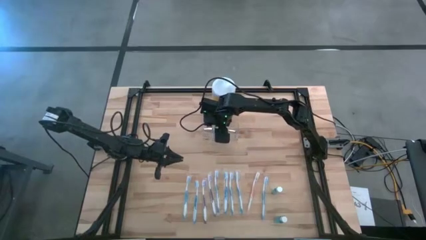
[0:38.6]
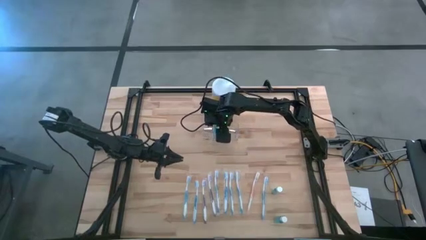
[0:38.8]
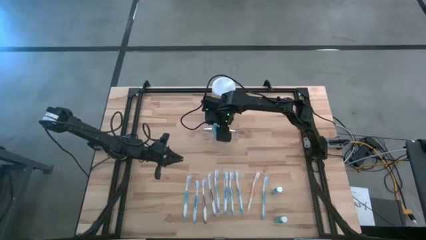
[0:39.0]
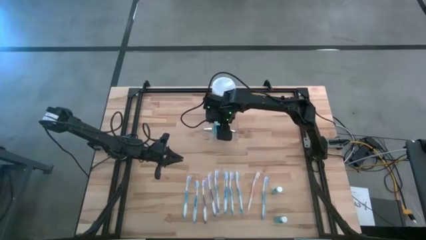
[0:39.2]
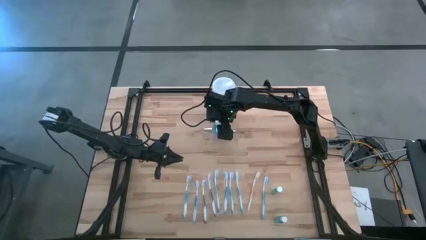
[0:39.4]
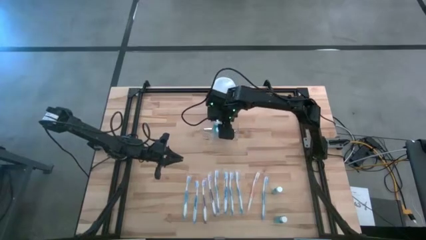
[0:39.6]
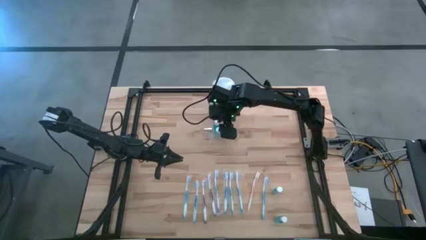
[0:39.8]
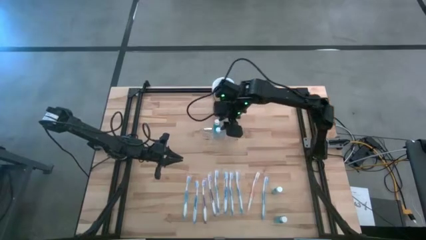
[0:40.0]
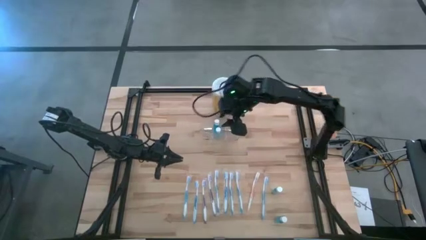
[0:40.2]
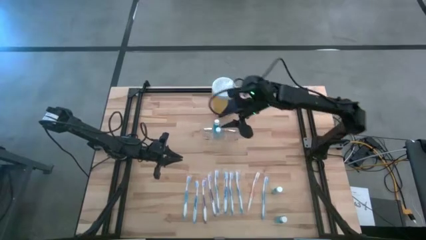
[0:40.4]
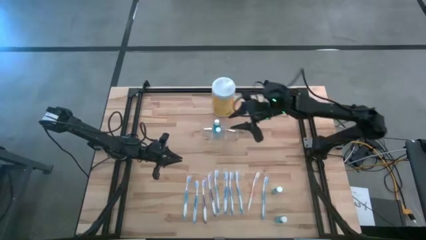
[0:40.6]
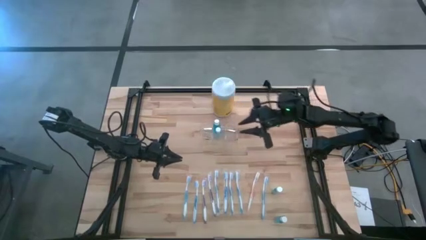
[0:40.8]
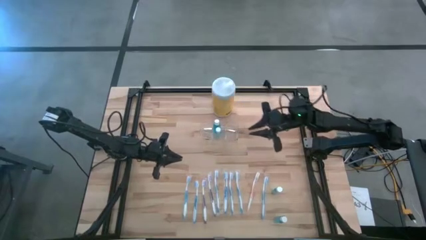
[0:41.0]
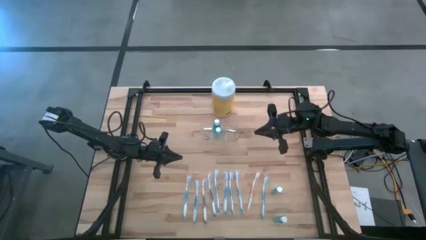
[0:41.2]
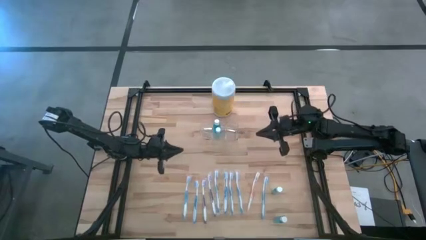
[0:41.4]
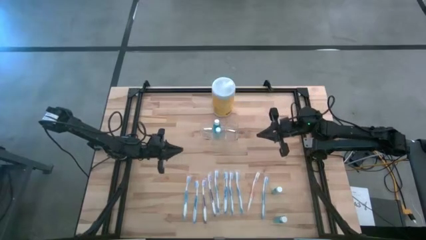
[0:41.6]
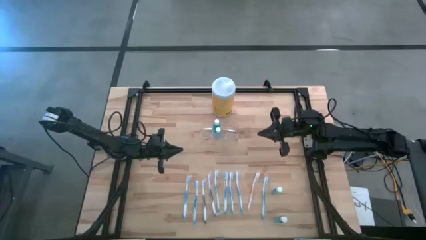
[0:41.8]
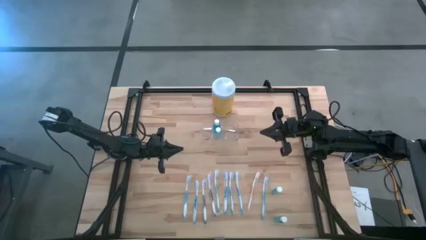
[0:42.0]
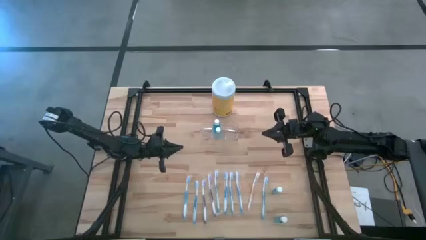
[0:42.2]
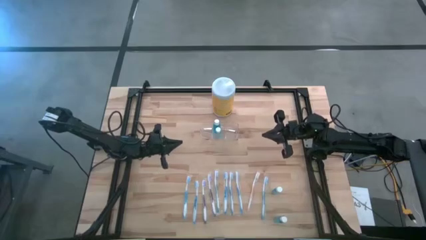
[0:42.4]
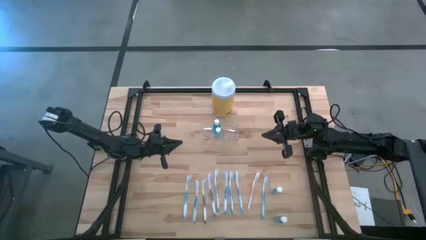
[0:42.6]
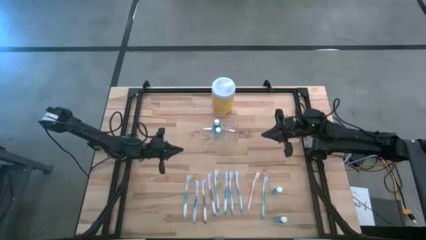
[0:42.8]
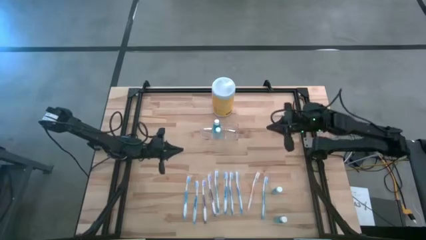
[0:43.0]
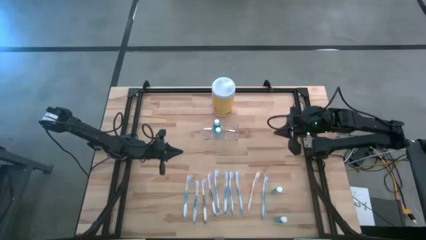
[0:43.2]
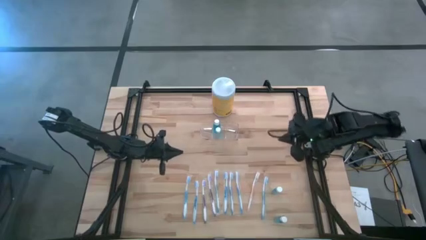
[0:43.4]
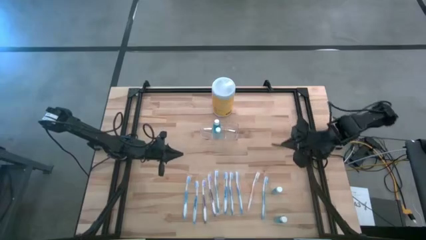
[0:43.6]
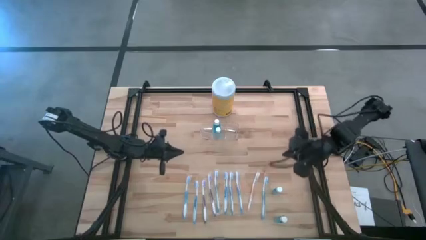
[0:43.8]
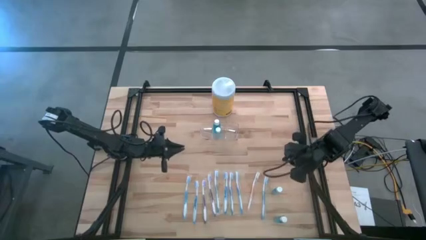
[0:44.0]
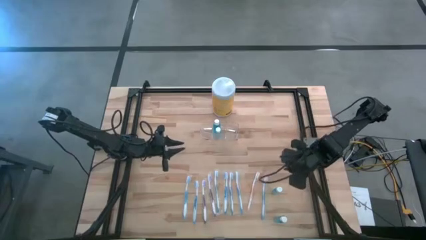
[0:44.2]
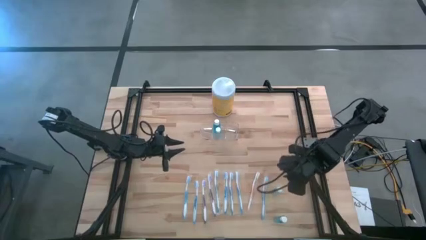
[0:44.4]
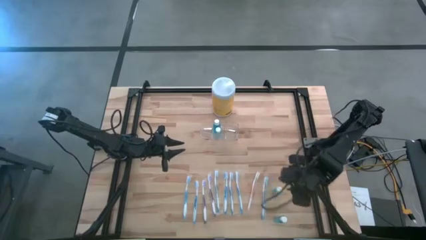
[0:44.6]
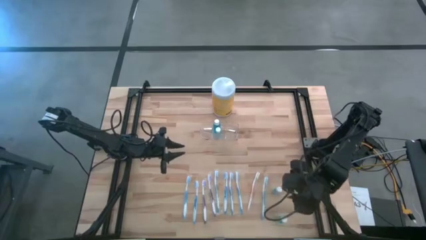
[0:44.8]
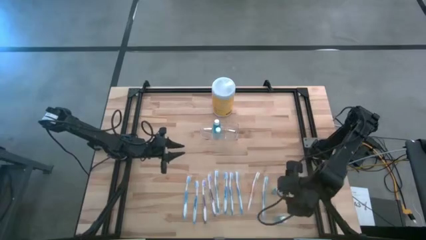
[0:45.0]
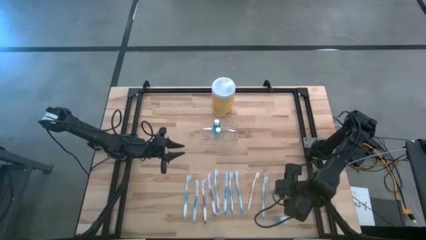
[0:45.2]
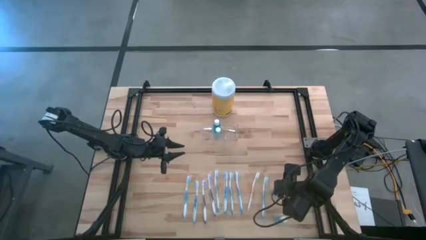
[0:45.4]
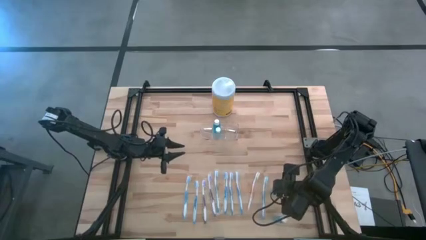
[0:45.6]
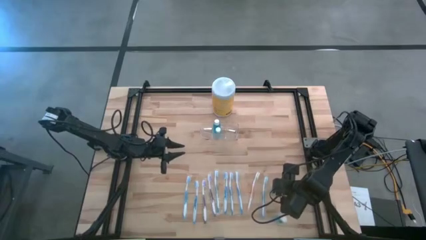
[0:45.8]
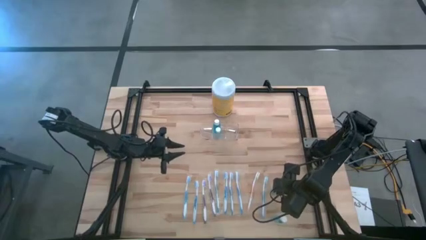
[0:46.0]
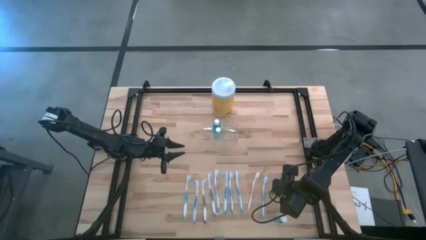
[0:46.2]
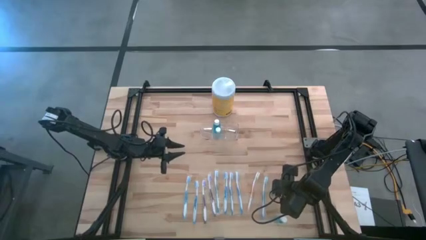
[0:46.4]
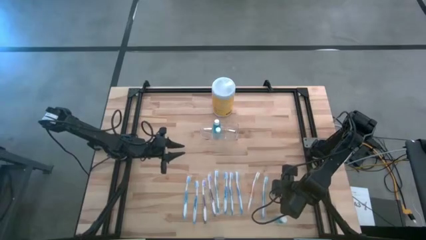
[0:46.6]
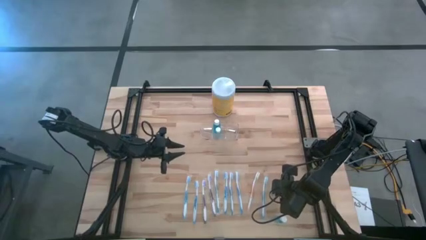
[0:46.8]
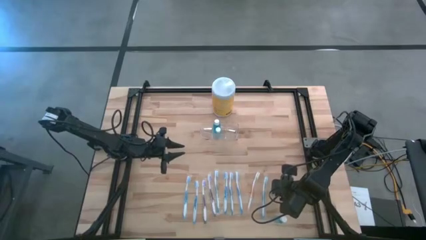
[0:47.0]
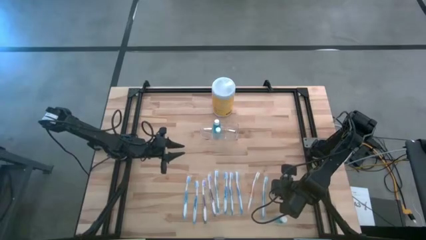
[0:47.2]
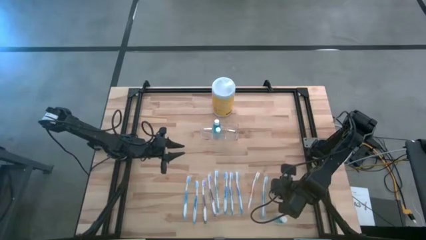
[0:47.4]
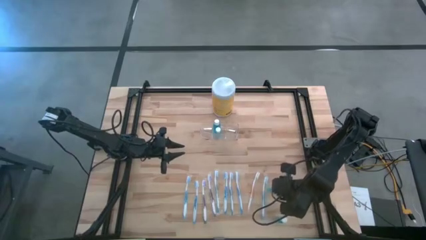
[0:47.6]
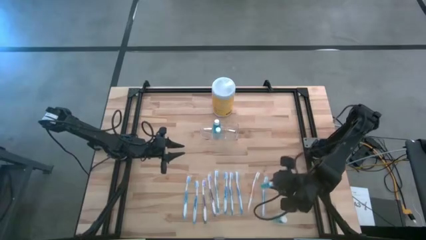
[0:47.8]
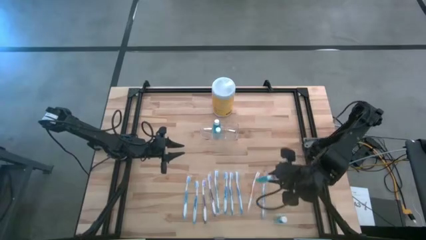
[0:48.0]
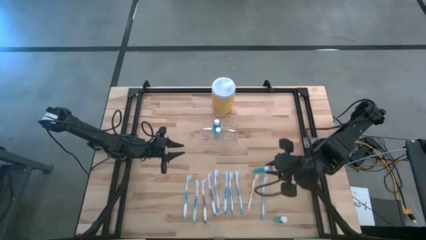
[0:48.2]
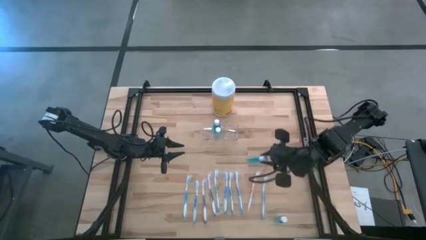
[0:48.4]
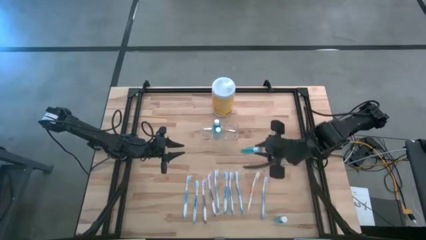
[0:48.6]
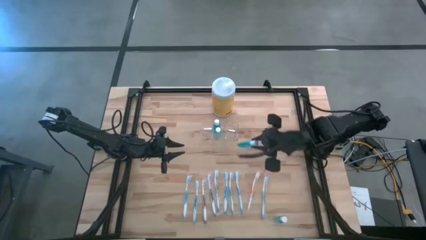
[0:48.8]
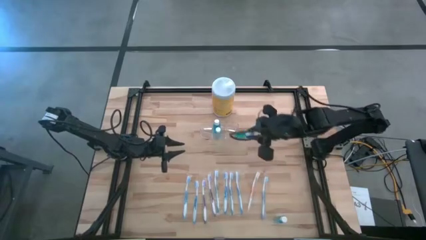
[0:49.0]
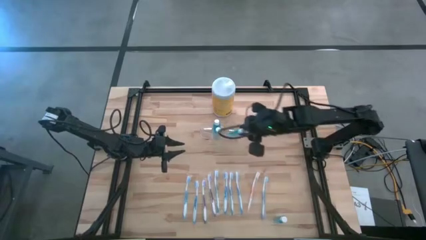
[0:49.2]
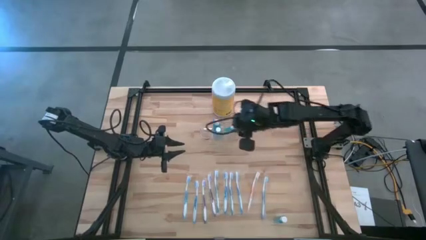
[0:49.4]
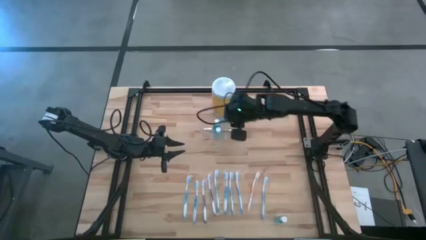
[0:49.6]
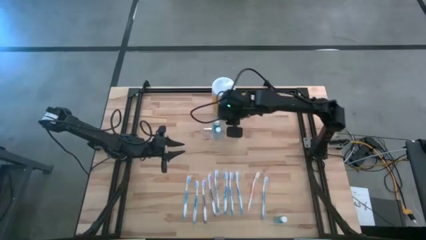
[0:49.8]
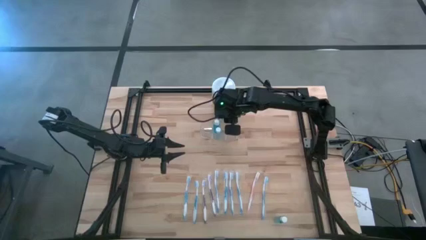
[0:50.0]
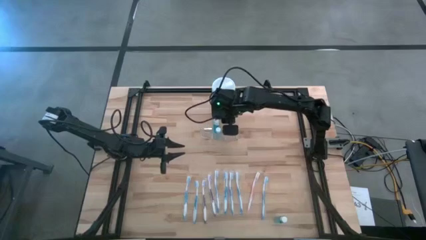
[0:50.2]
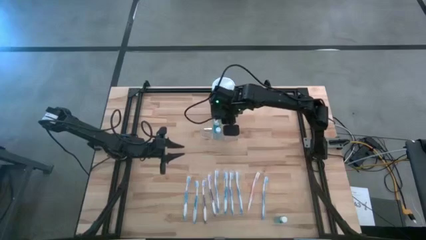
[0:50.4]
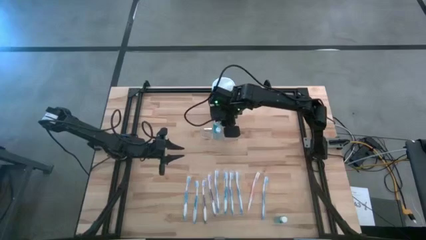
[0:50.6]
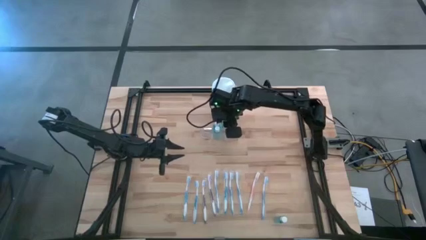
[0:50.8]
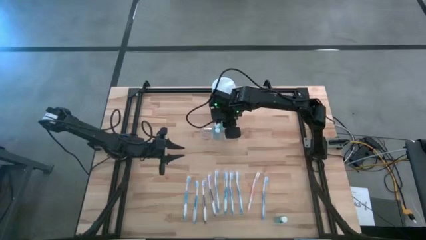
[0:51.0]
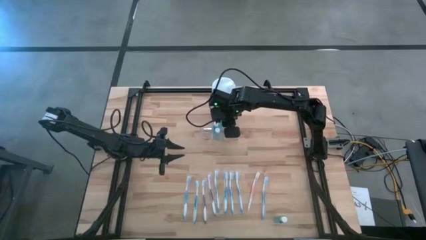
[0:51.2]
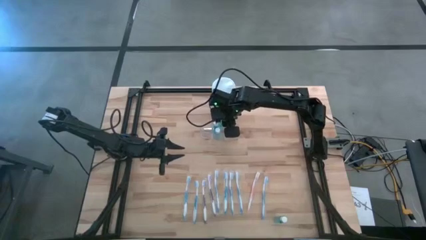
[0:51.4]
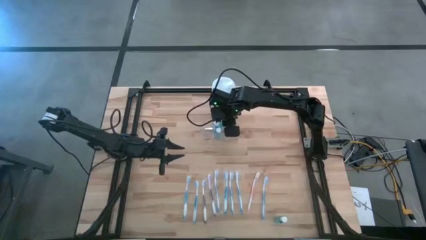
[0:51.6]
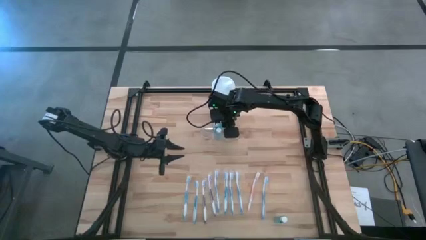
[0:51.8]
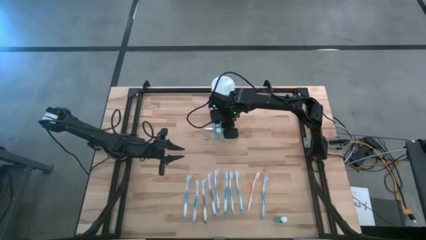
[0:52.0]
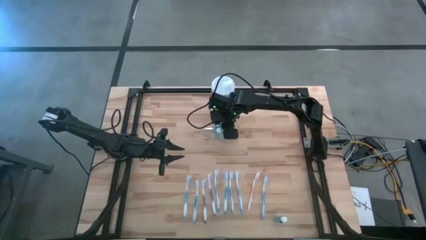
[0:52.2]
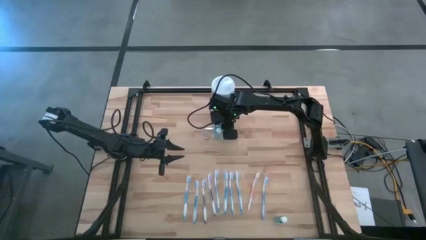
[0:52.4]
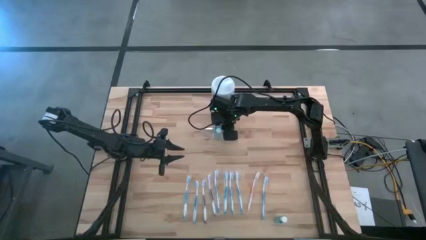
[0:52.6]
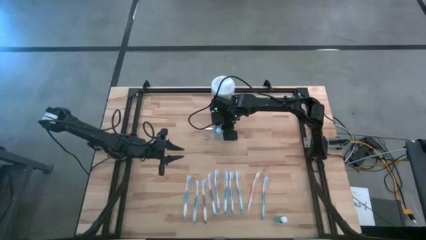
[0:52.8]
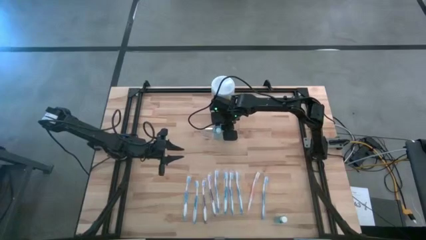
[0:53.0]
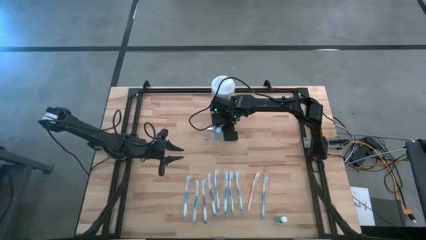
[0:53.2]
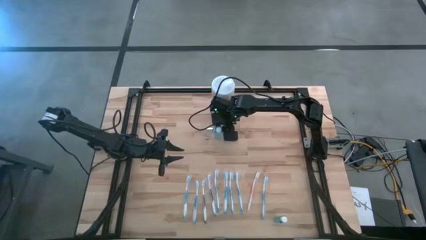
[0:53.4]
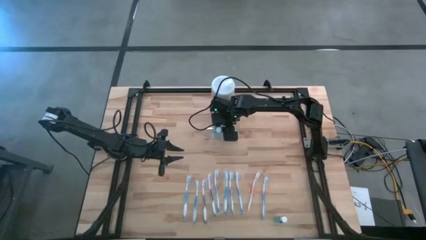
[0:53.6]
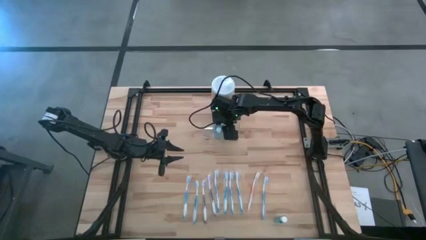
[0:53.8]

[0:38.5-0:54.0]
Task: Pick & Place toothbrushing station
Put the blue mouthwash into the transparent organizer
